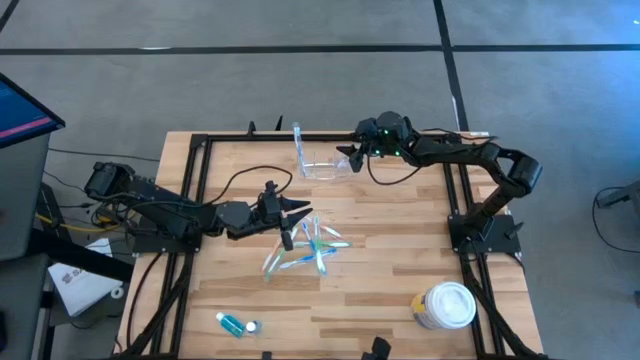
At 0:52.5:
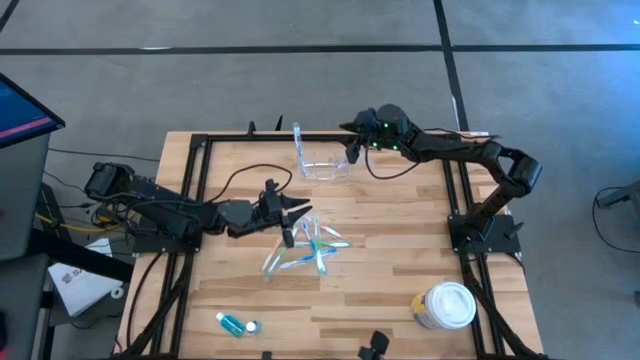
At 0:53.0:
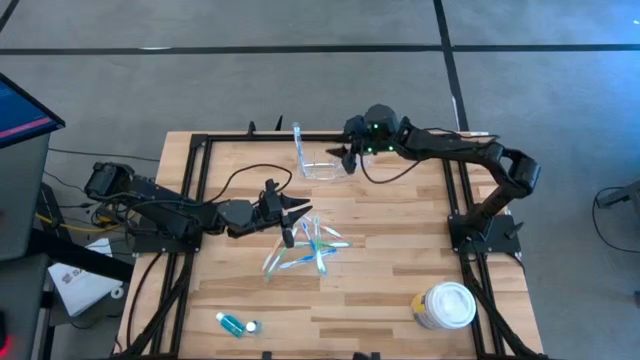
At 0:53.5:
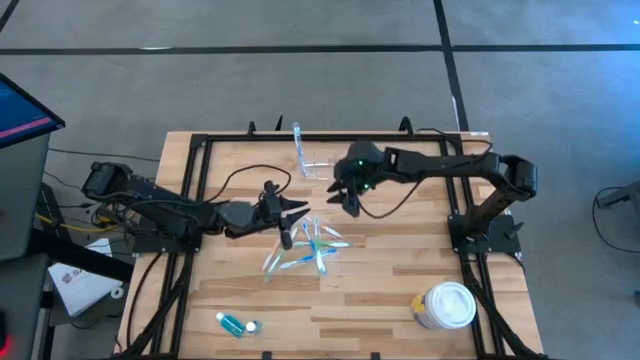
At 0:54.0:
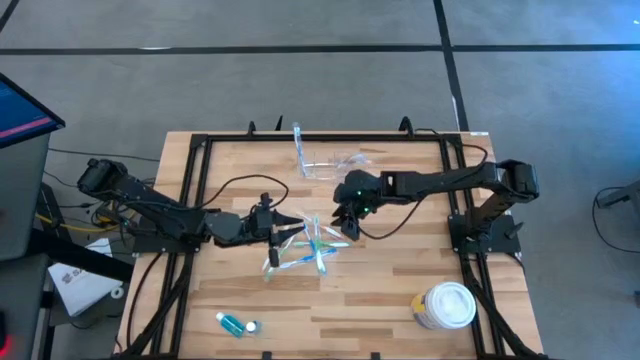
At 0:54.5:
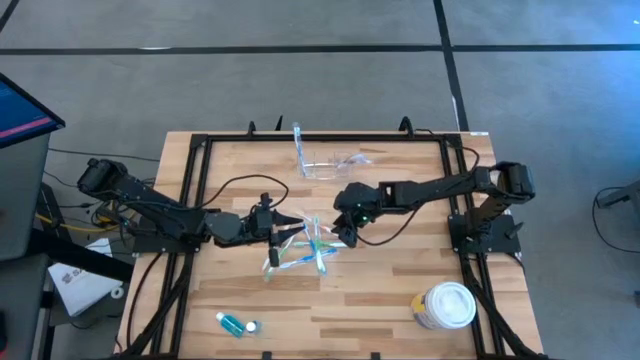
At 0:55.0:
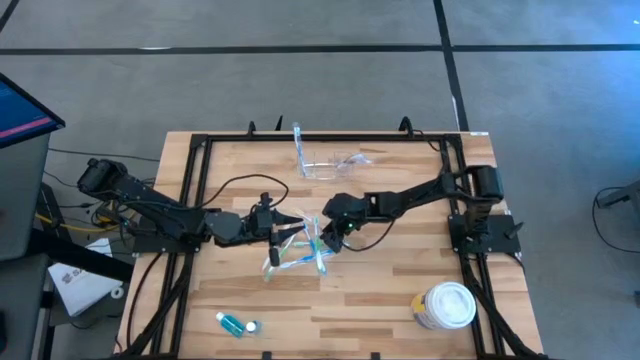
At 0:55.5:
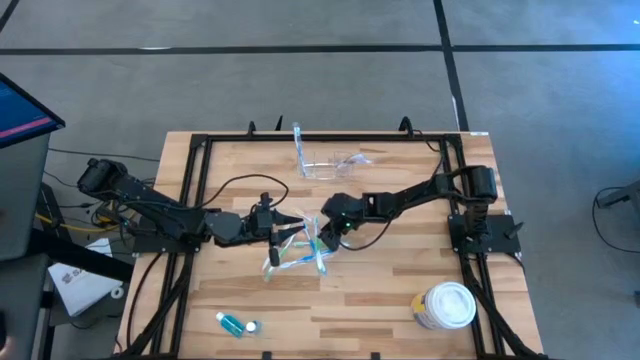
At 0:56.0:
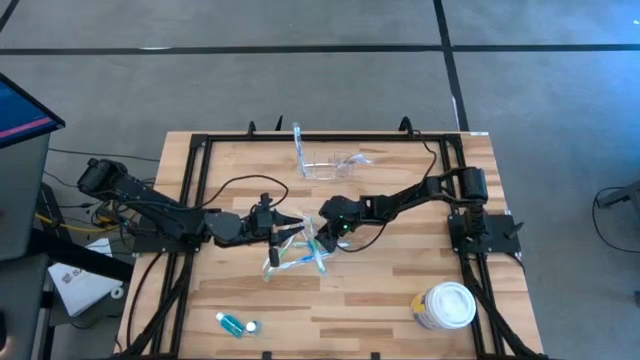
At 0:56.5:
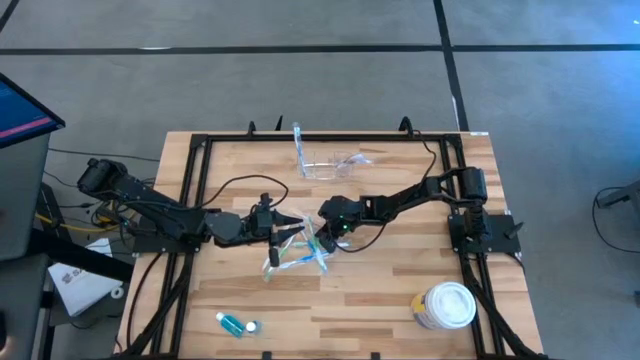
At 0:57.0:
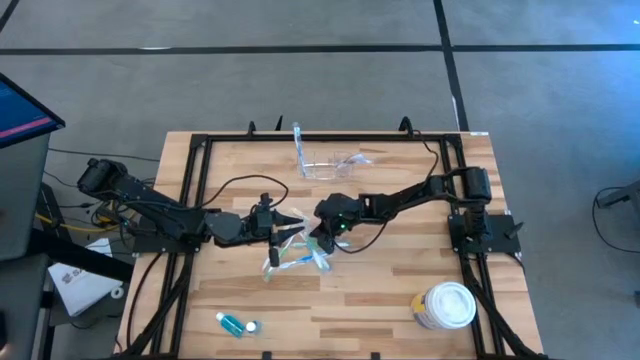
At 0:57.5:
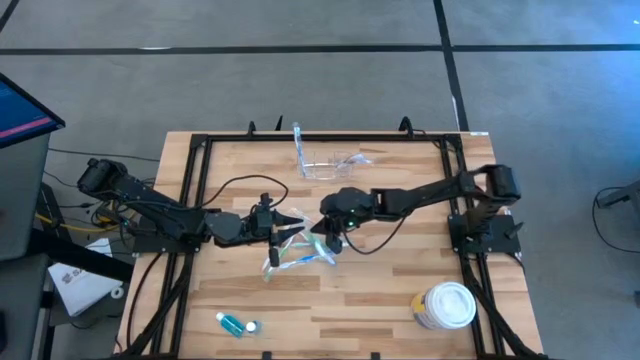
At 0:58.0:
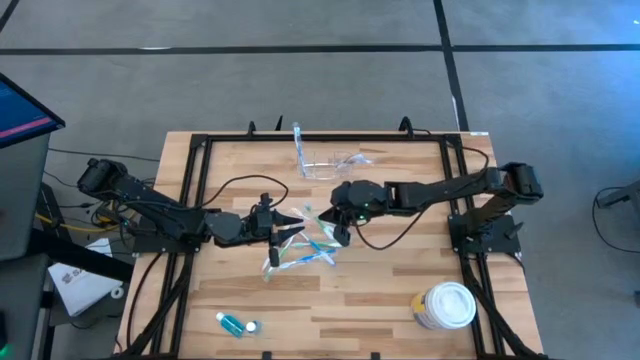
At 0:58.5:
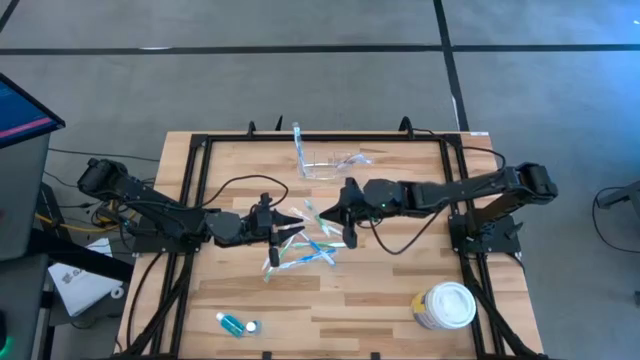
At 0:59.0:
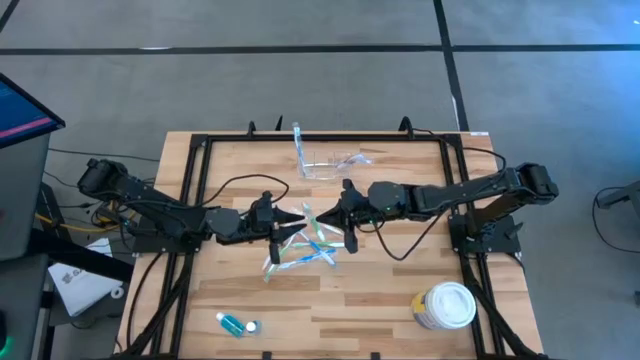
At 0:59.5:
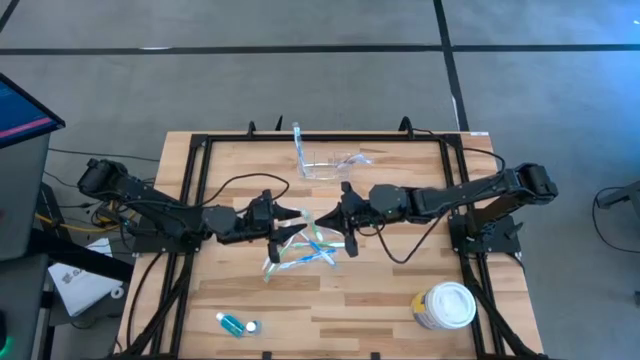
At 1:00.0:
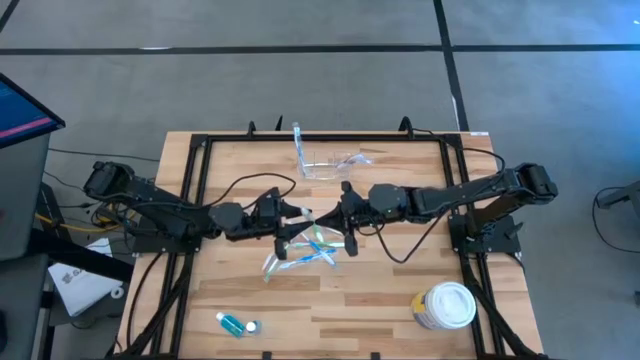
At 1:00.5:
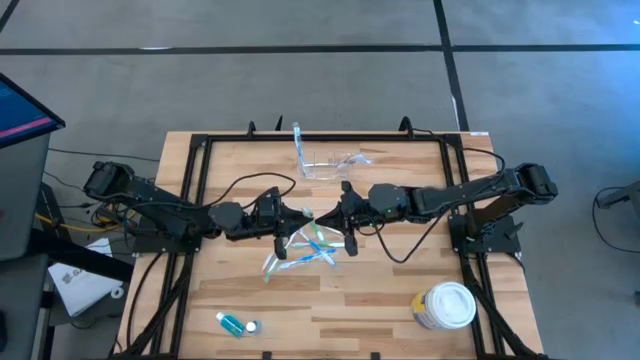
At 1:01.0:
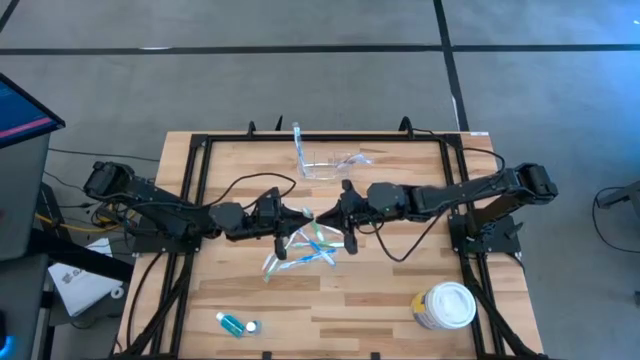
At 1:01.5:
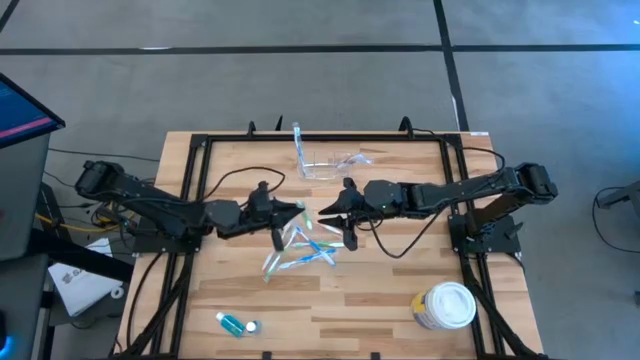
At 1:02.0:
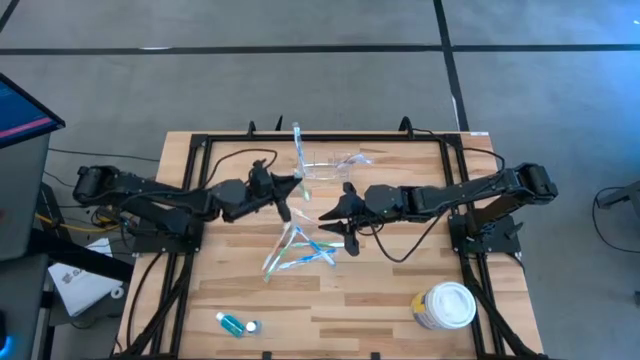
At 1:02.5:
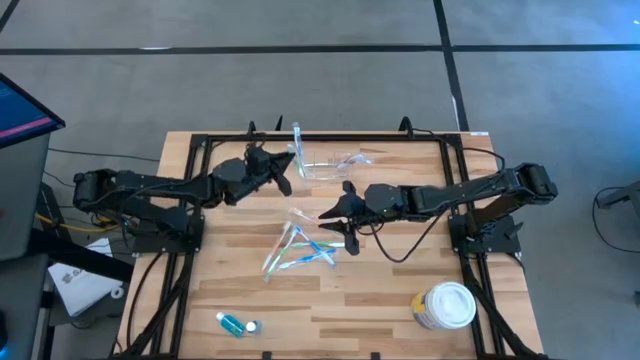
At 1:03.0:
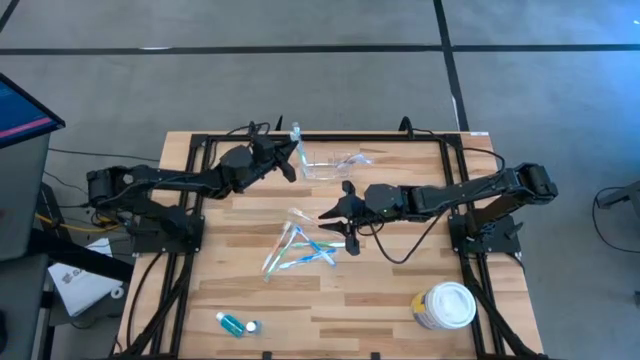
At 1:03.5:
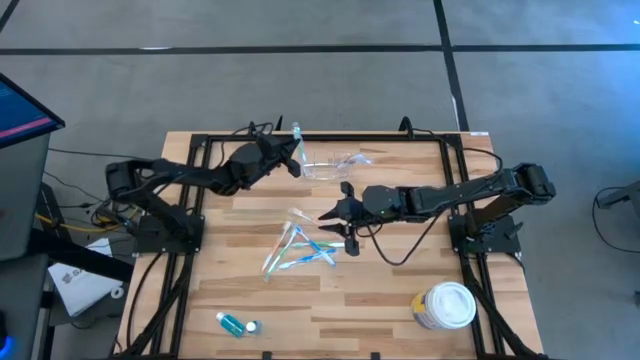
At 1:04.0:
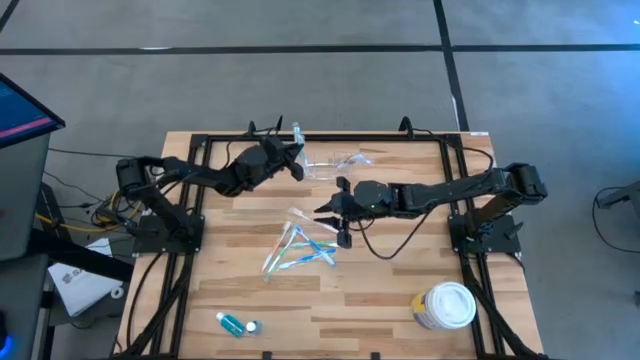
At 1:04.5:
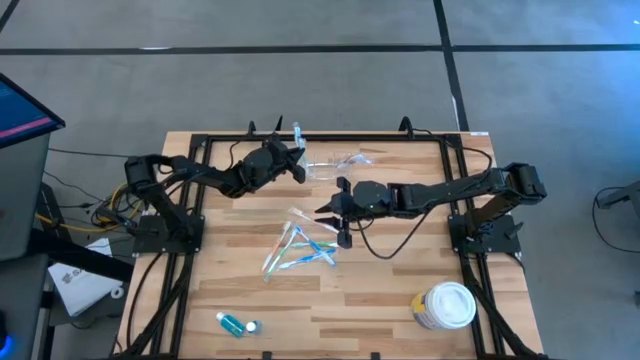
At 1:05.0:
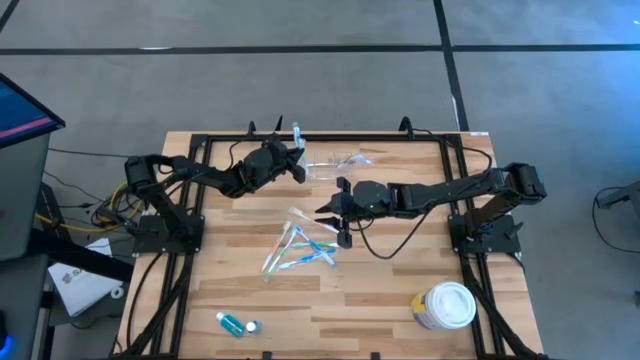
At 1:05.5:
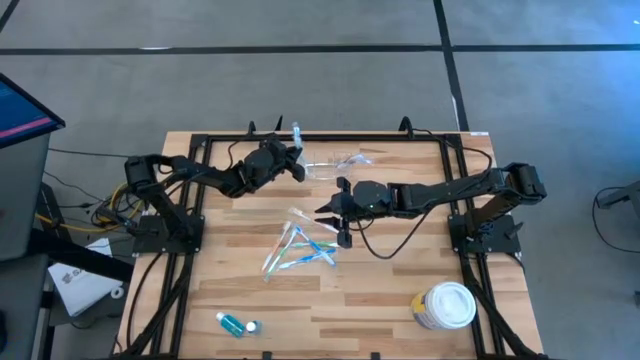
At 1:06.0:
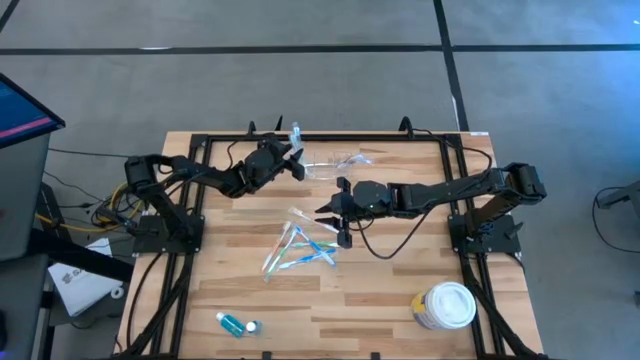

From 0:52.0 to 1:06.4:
Task: Pick & Place toothbrushing station
Put the green toothbrush into the transparent organizer
